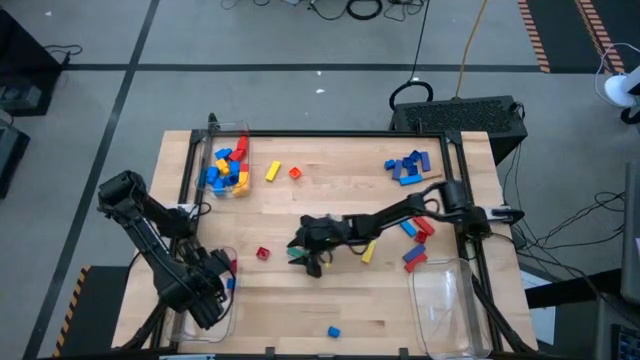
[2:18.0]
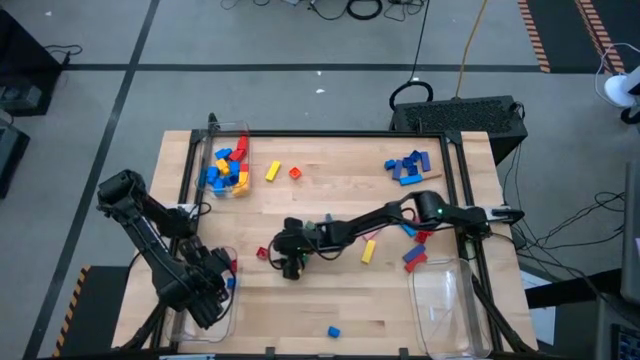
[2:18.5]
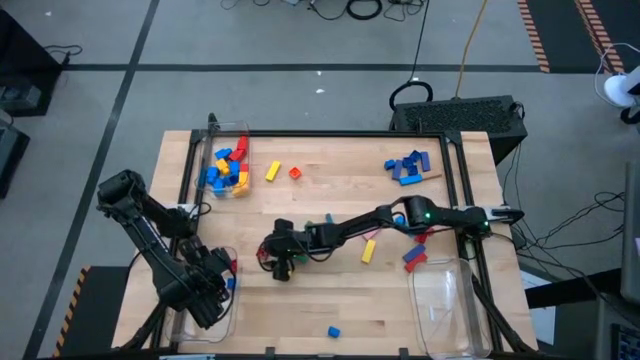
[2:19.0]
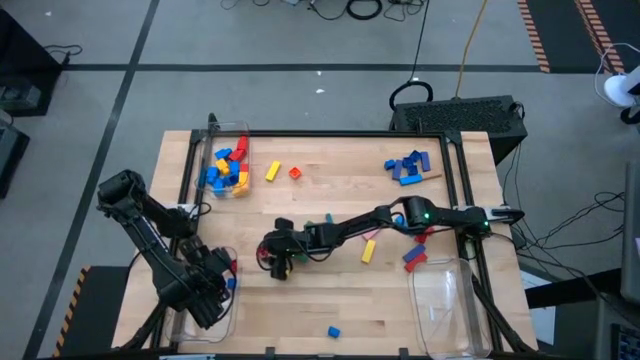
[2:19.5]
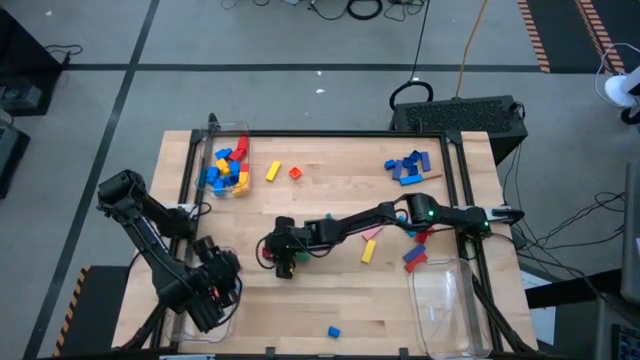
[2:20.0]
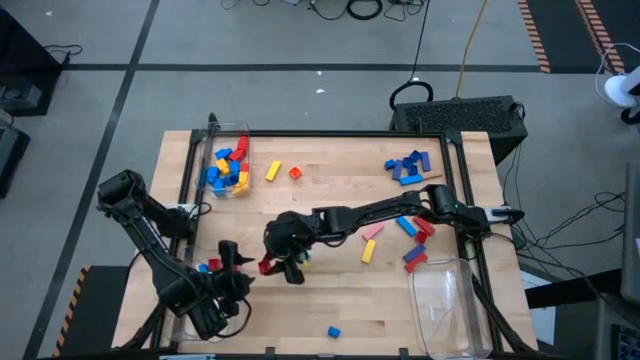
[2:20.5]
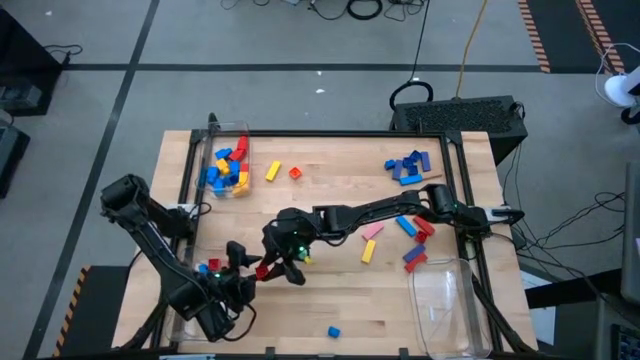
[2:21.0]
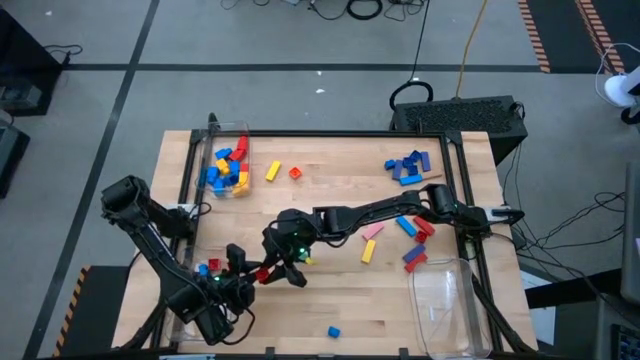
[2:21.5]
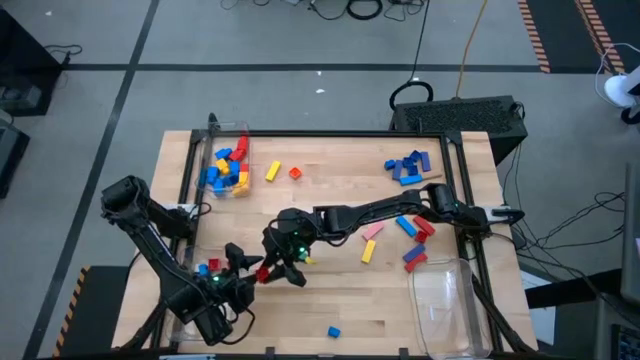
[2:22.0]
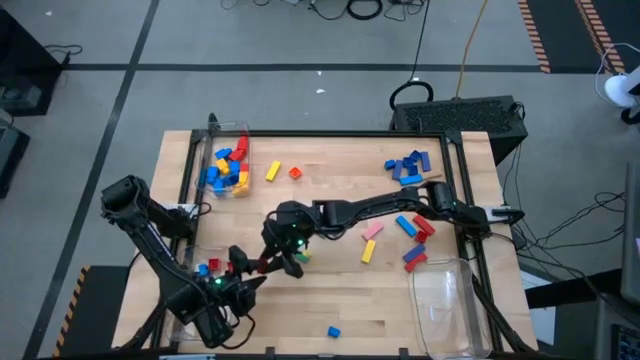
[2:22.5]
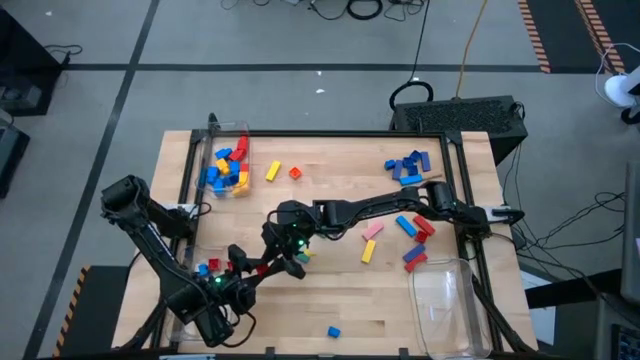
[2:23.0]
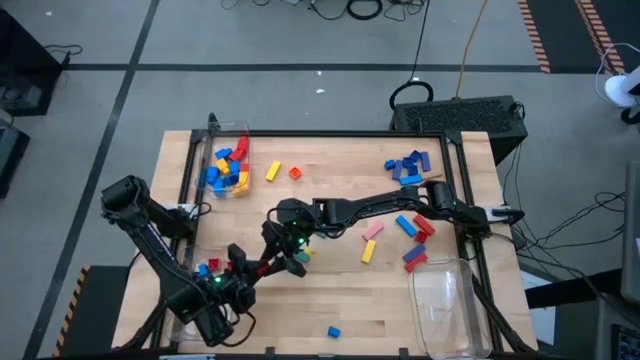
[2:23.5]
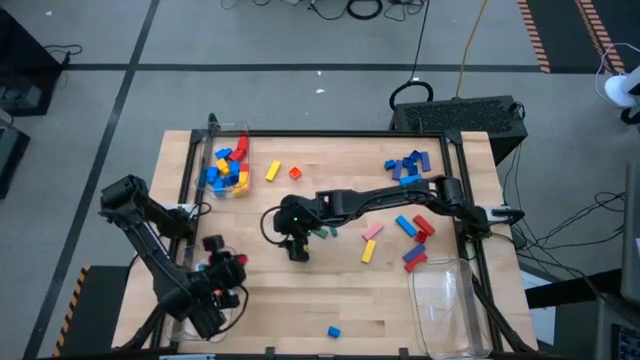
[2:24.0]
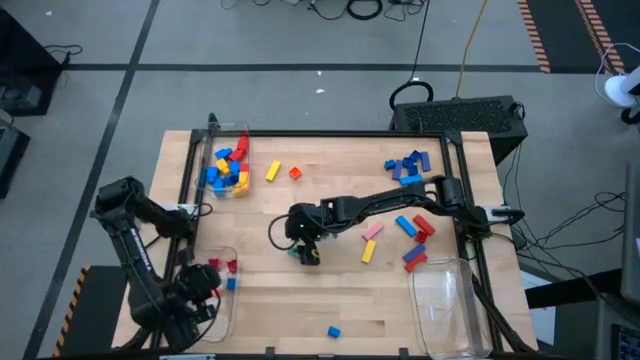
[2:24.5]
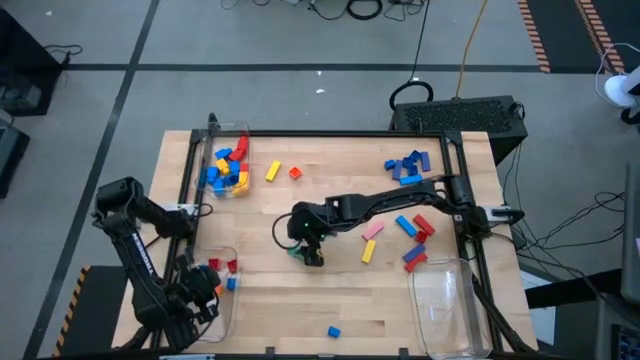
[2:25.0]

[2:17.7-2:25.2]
Task: Sort blocks by size
Put the red four stud game piece into the bottom left transparent bin

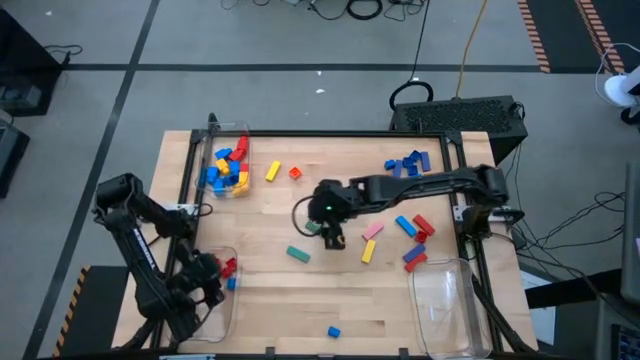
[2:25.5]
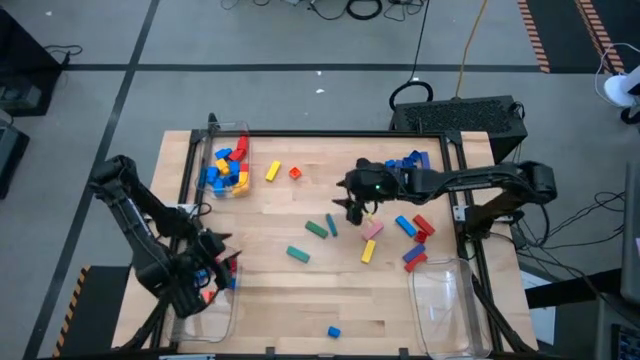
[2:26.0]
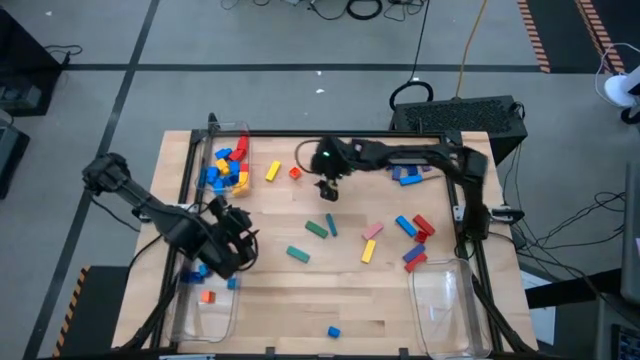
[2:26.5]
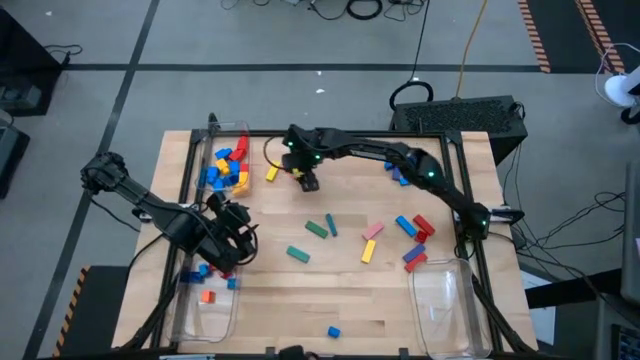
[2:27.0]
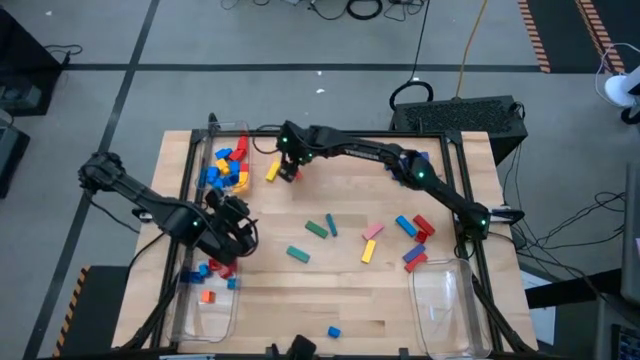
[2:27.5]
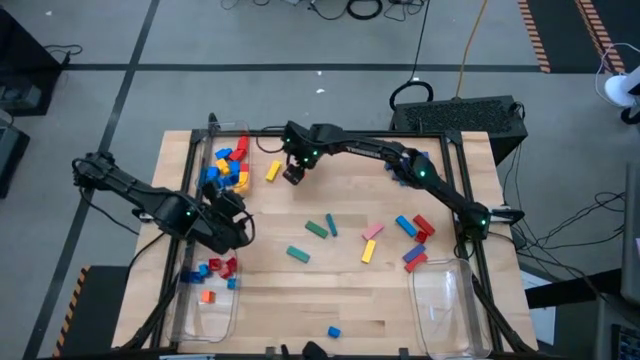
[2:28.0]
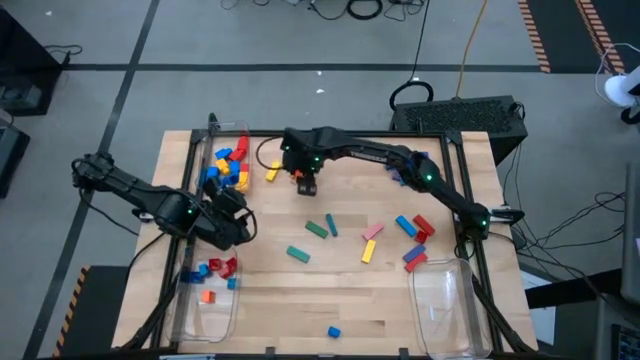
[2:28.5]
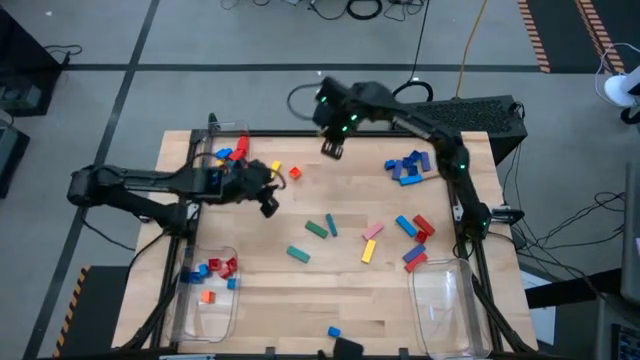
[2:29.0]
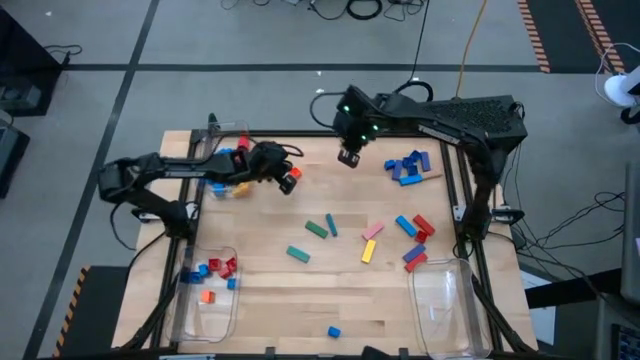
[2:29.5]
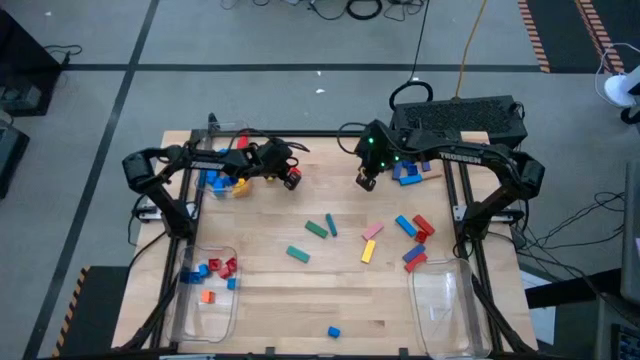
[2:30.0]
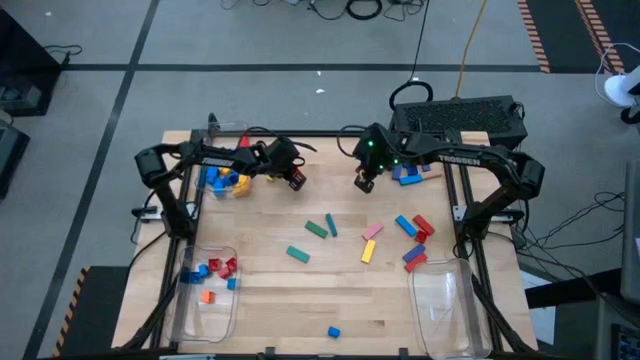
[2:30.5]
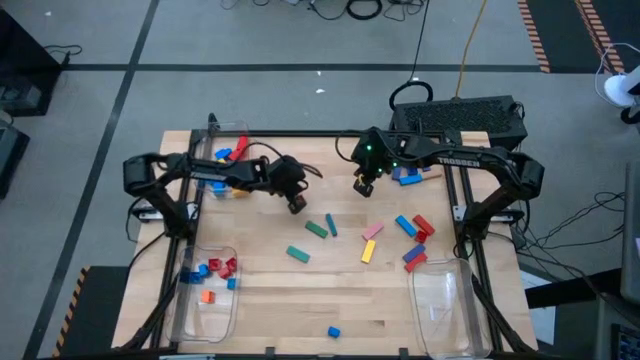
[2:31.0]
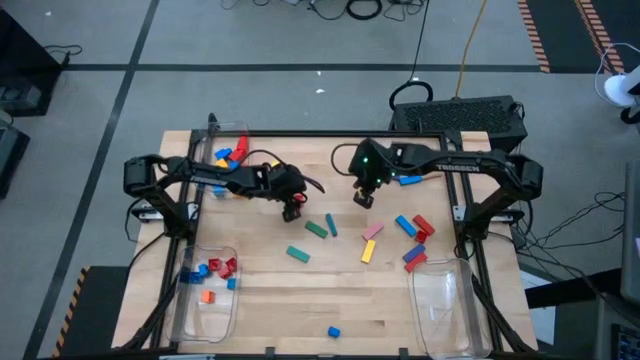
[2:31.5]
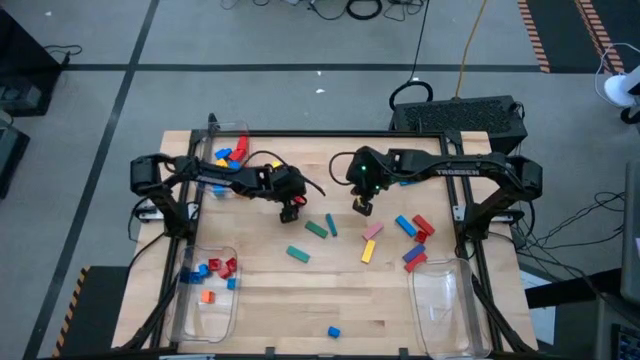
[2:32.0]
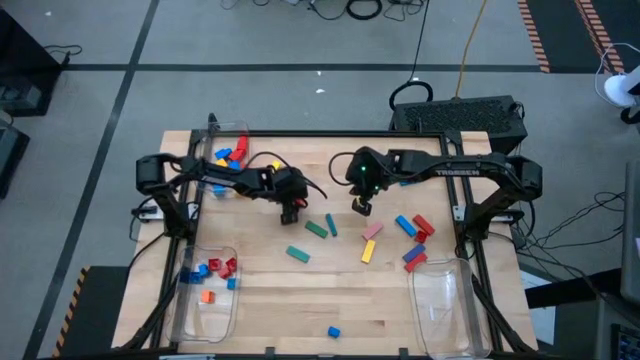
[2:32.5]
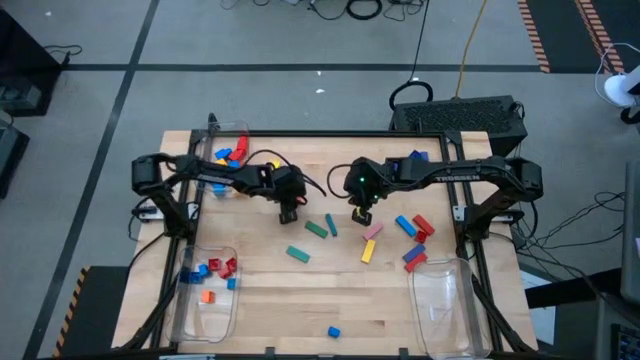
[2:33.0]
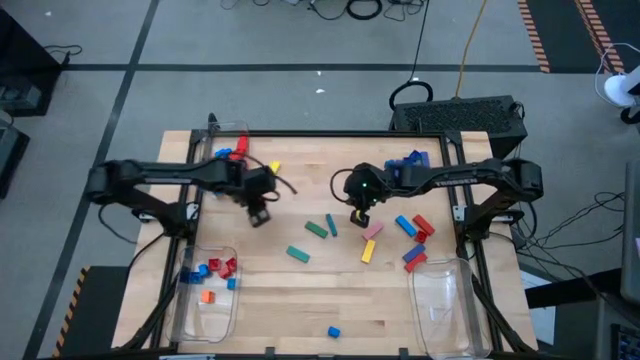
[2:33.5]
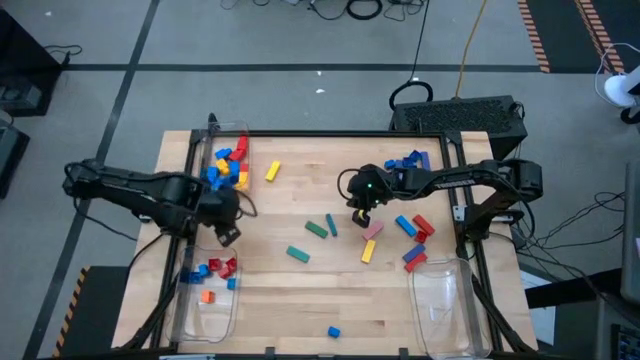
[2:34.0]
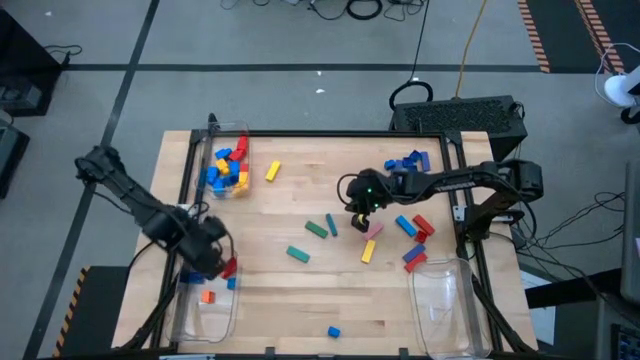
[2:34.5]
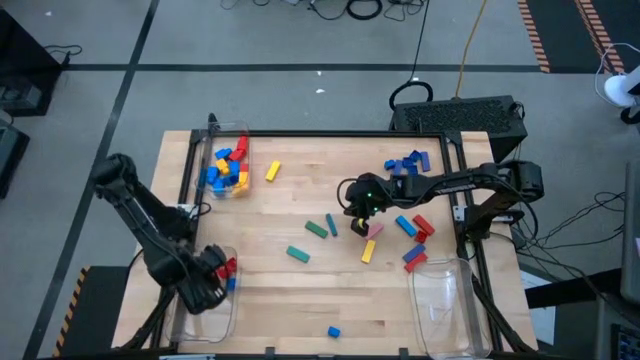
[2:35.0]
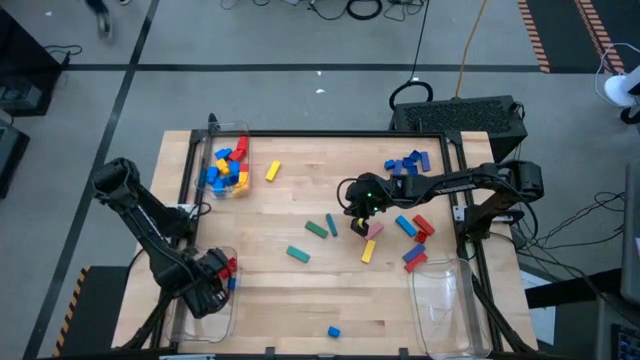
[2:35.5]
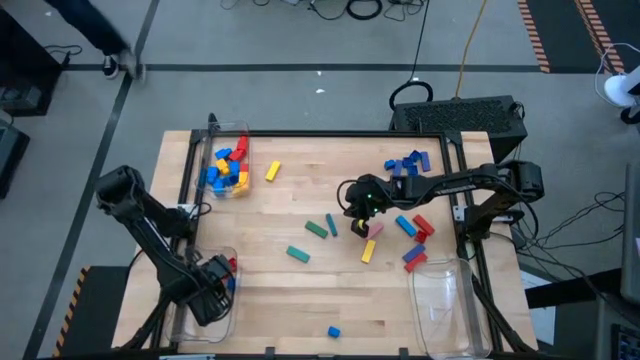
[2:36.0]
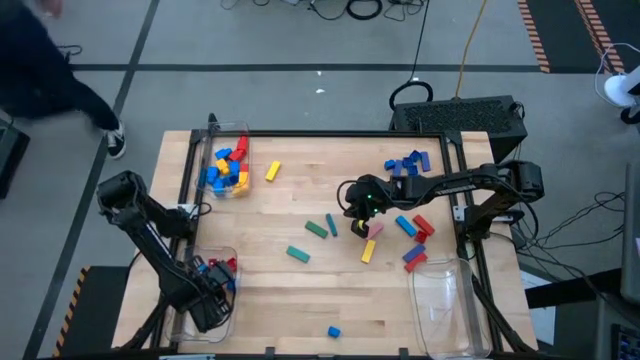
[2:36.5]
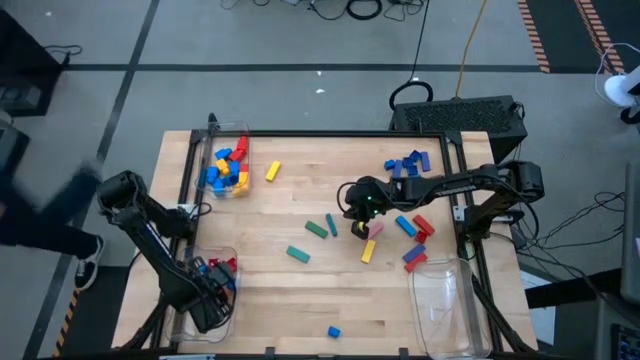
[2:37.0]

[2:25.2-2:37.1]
Put the orange four stud game piece into the bottom left transparent bin

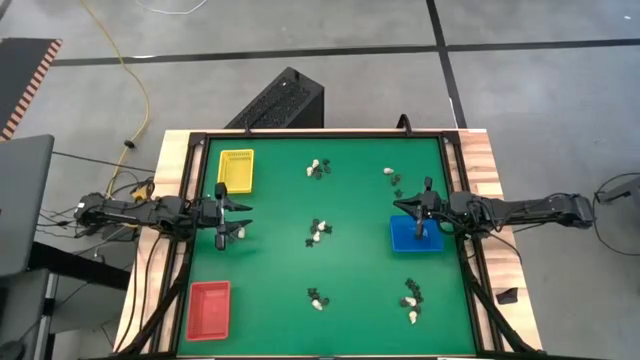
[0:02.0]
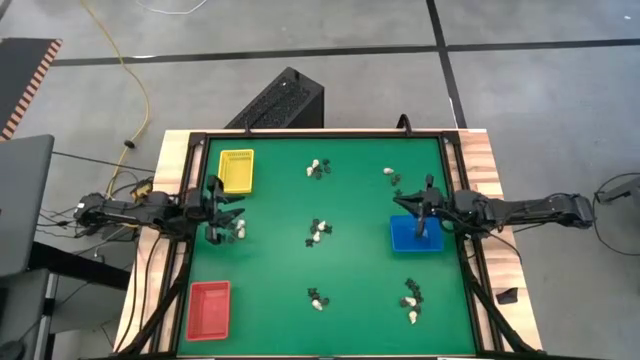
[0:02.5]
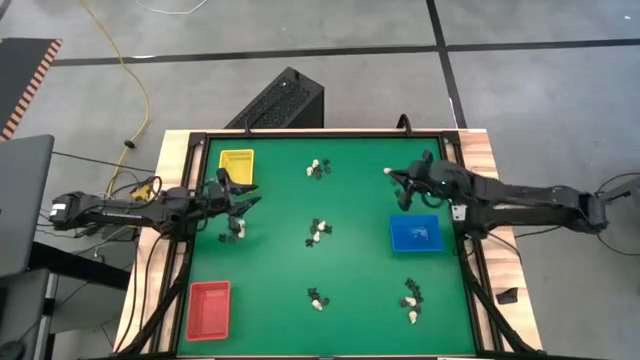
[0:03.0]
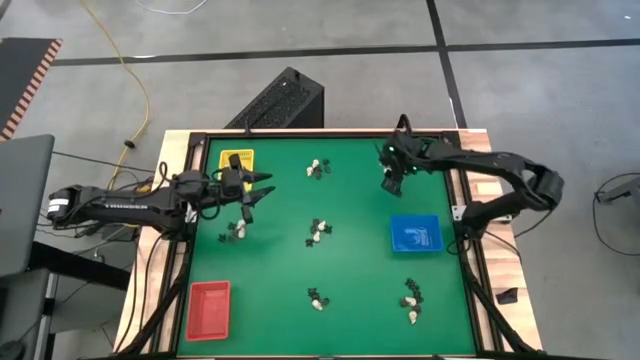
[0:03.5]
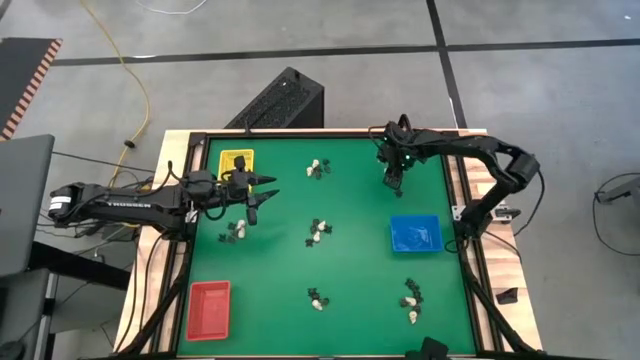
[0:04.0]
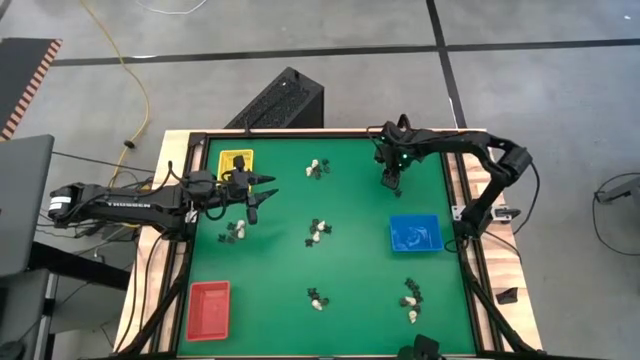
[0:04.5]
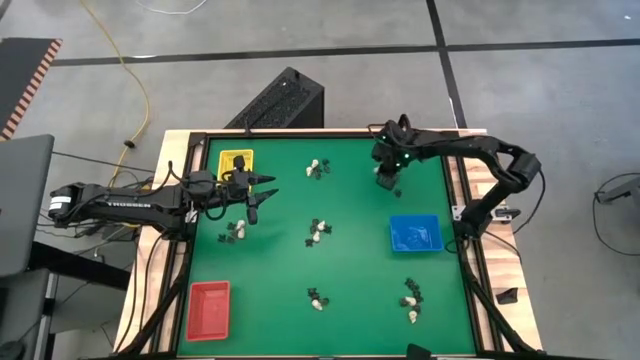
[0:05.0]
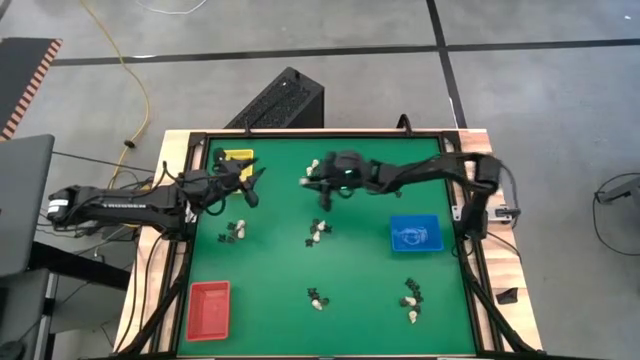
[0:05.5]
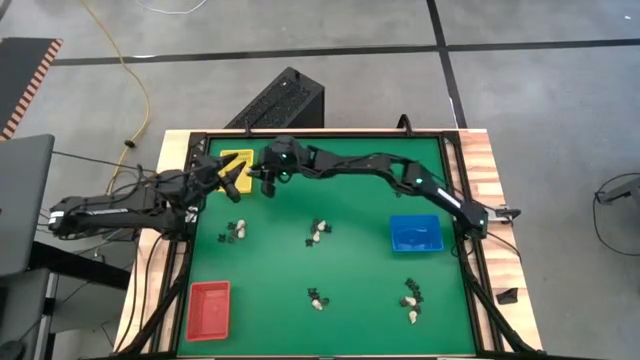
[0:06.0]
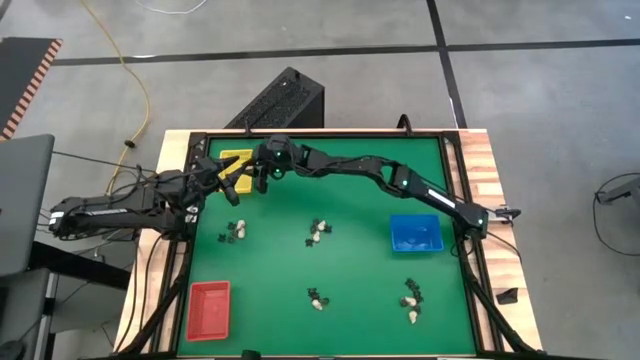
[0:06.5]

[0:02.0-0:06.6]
Task: Sort Halloween decoration
Put the white skull toy into the yellow bin
